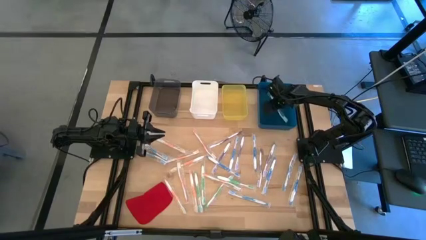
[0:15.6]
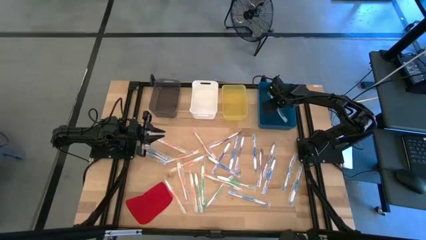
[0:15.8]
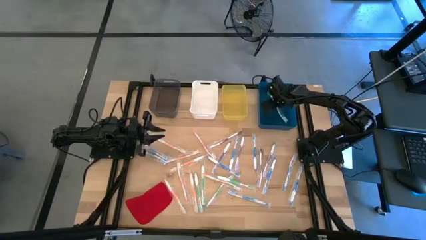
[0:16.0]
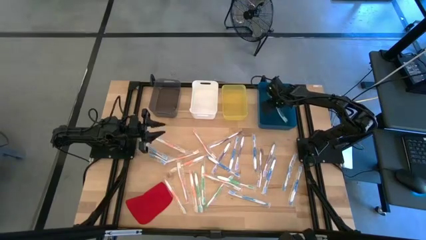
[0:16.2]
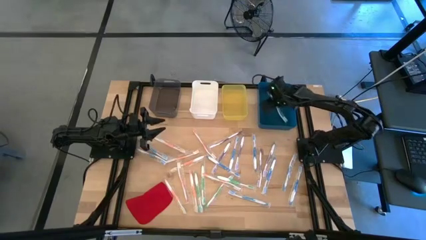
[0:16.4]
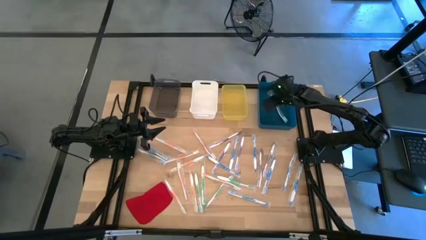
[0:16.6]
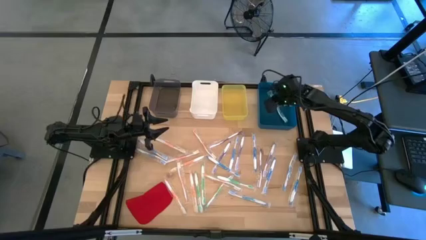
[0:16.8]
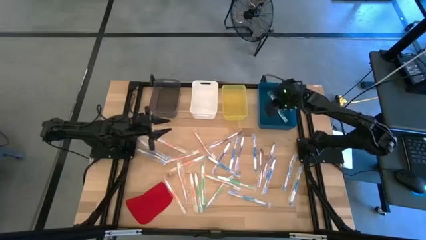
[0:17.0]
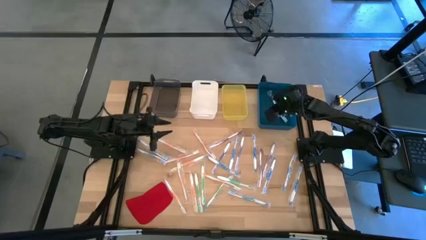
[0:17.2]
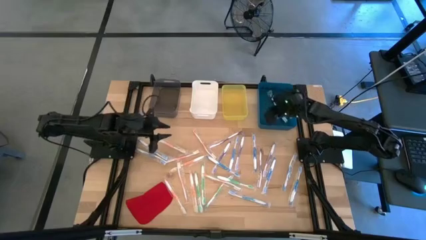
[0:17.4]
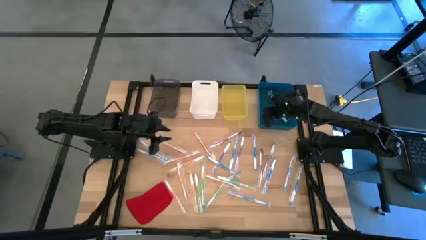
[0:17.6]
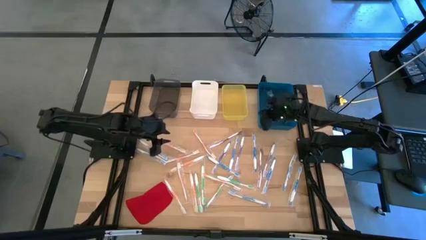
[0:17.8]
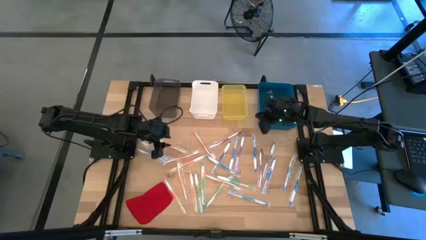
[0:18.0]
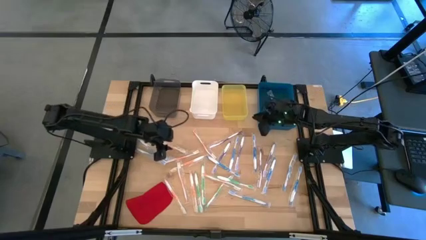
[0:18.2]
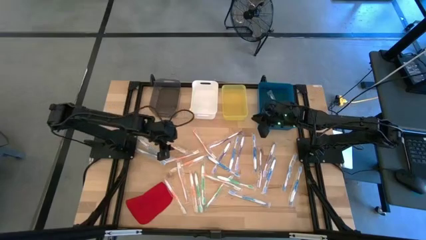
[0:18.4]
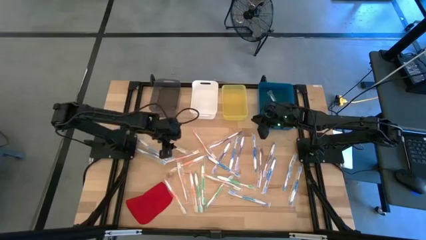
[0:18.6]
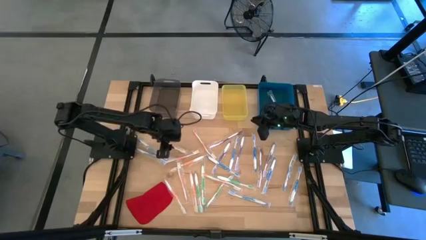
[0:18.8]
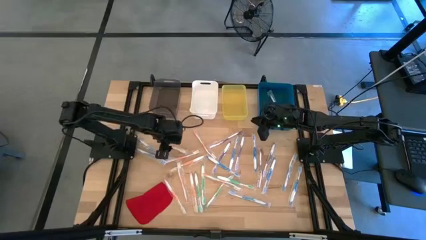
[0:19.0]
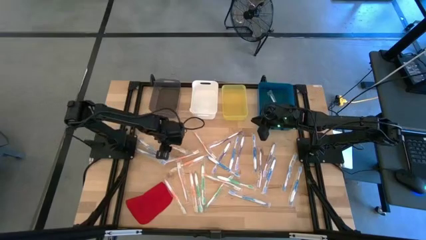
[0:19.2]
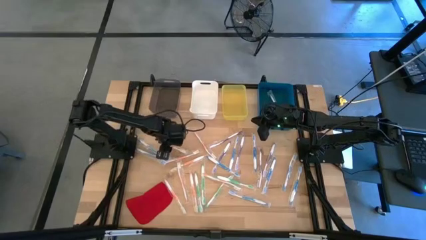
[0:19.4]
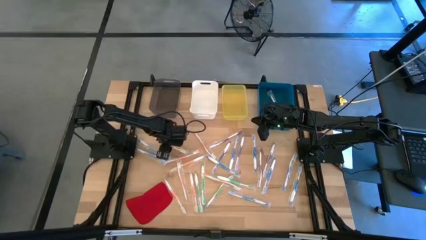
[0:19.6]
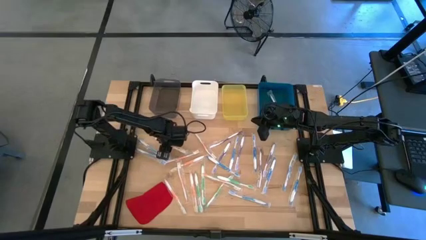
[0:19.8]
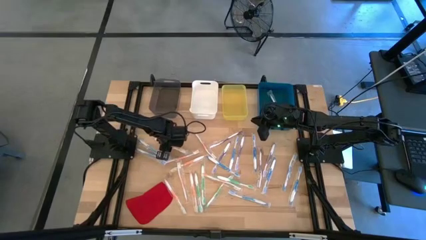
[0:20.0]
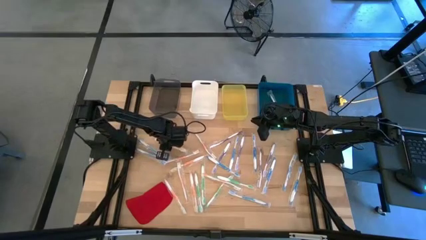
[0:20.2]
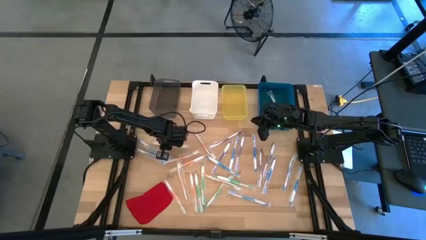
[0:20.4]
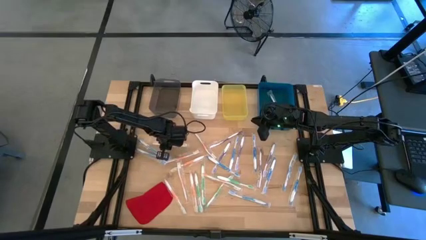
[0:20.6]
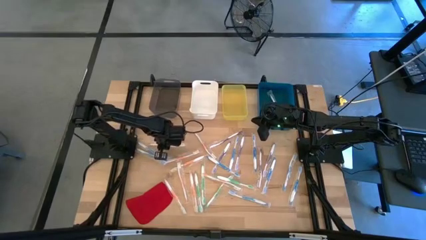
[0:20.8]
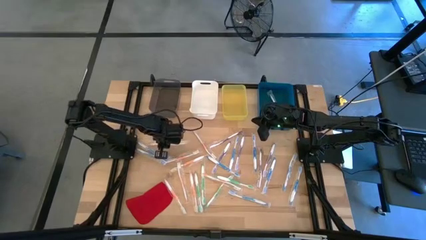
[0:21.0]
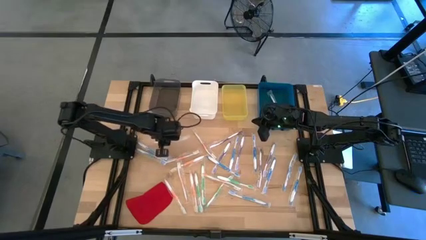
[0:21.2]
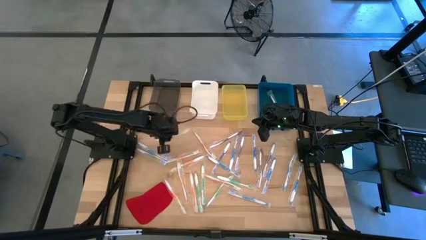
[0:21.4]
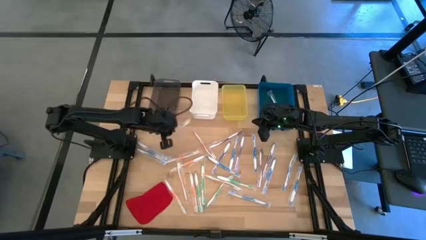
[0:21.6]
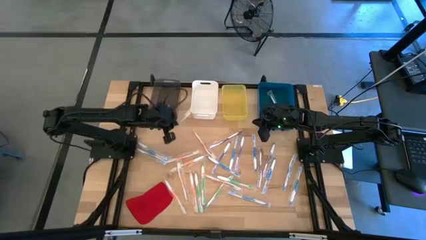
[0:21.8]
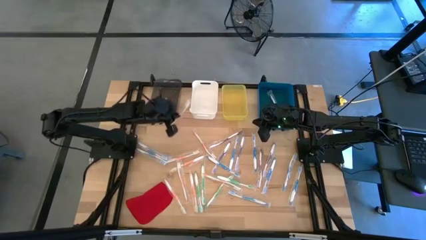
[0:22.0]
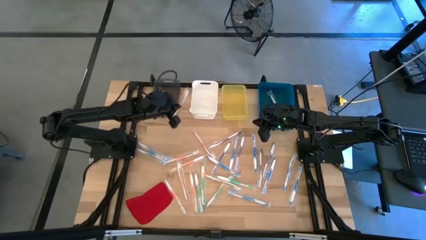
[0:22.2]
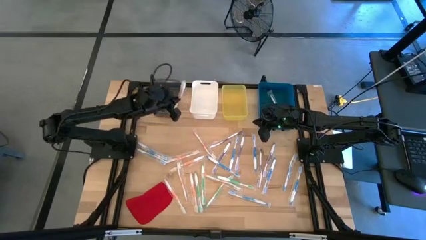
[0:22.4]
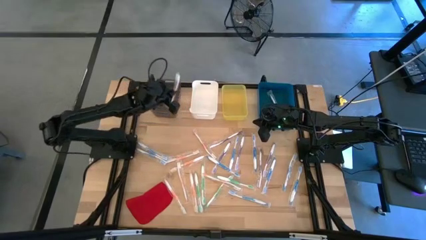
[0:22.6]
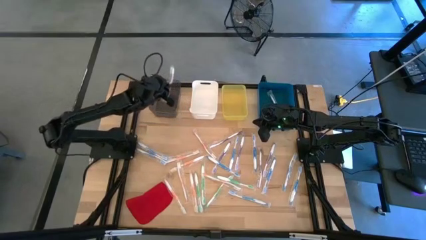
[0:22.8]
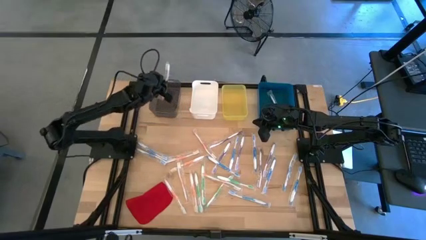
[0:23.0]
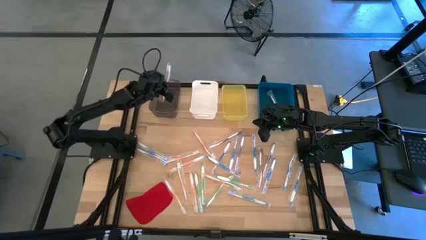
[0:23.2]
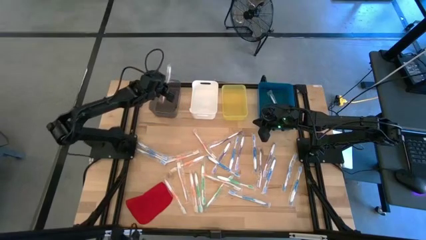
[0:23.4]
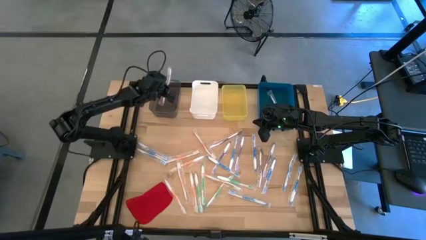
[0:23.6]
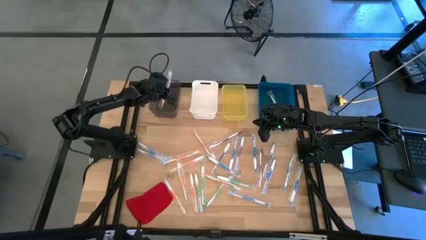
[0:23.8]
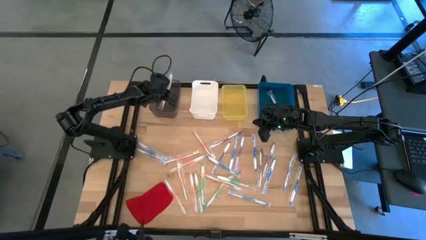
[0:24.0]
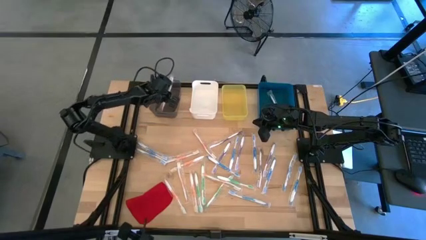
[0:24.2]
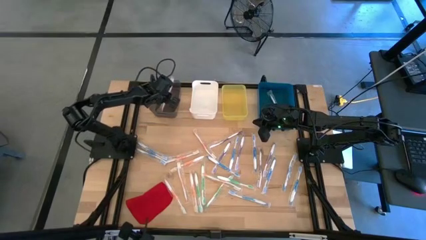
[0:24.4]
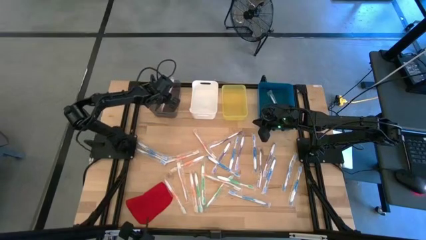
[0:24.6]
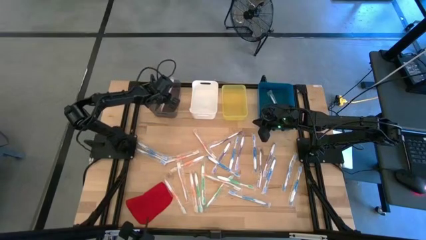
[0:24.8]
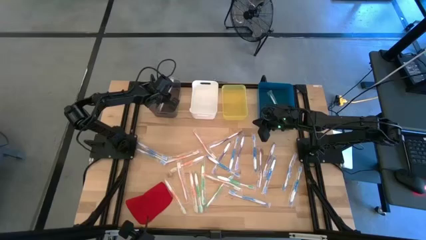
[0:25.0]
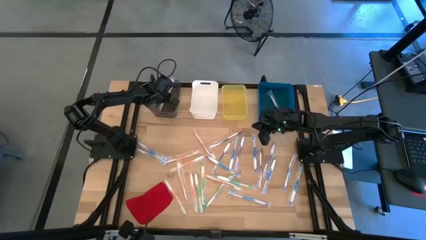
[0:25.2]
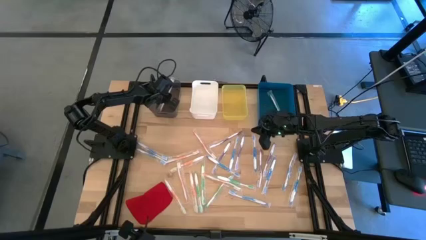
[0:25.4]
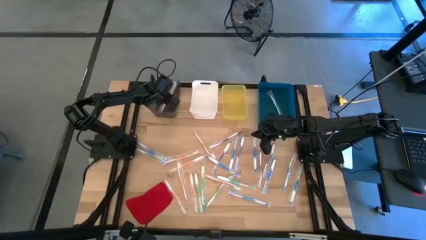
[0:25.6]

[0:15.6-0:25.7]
Task: Pick & Place Toothbrushes
Put the orange toothbrush into the black bin
